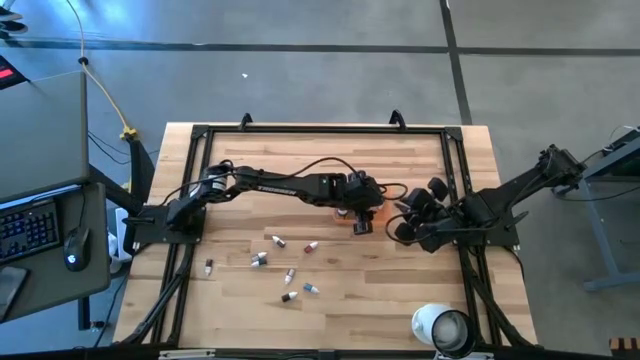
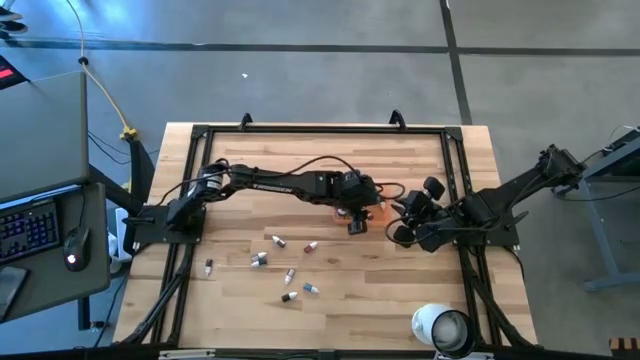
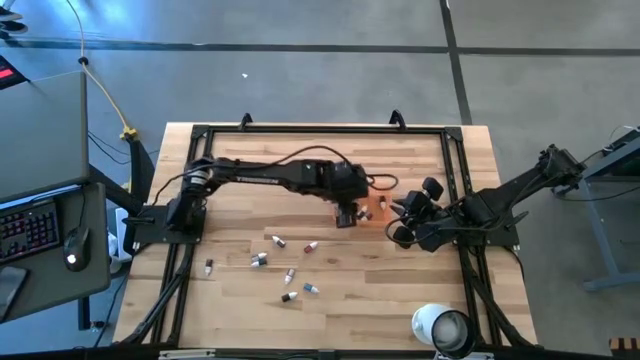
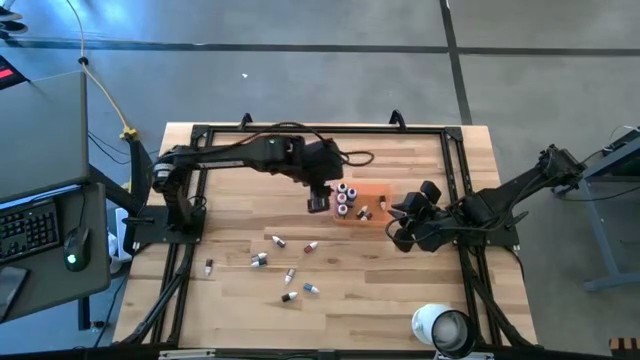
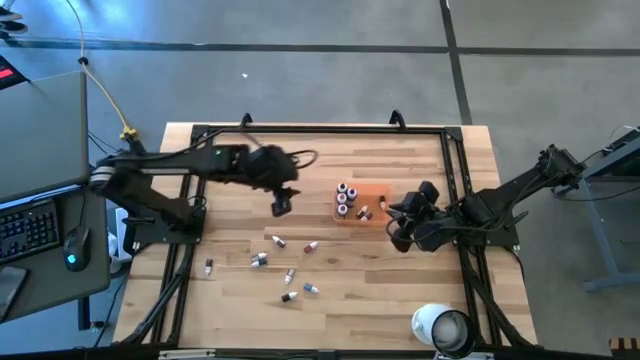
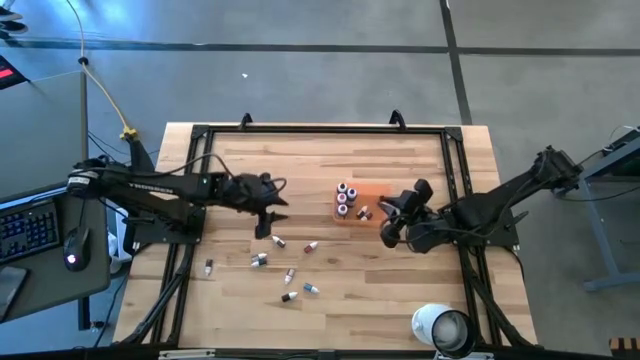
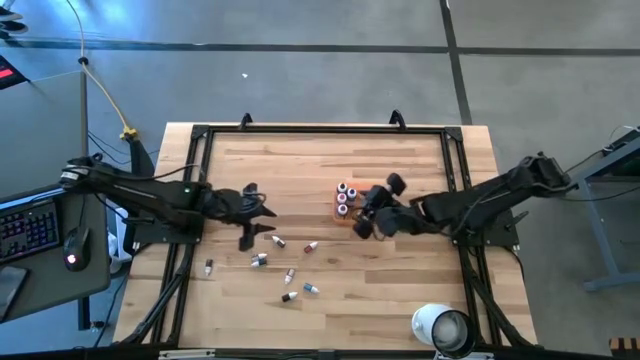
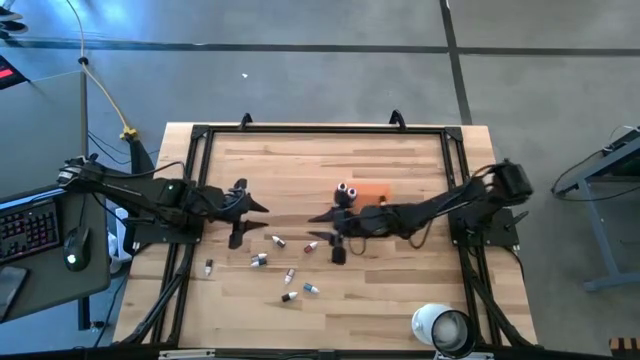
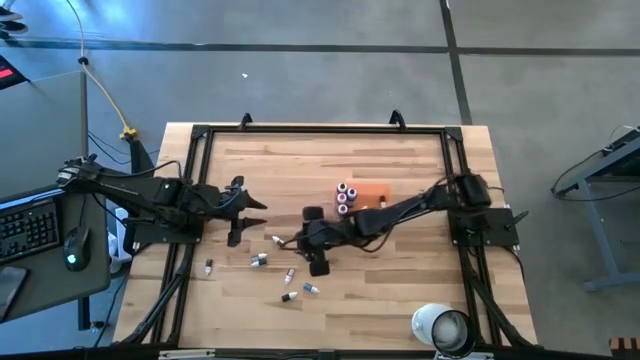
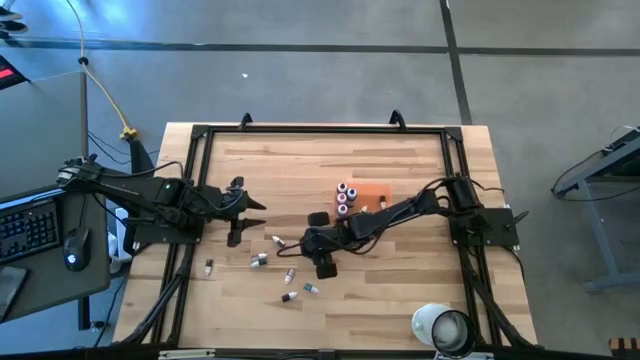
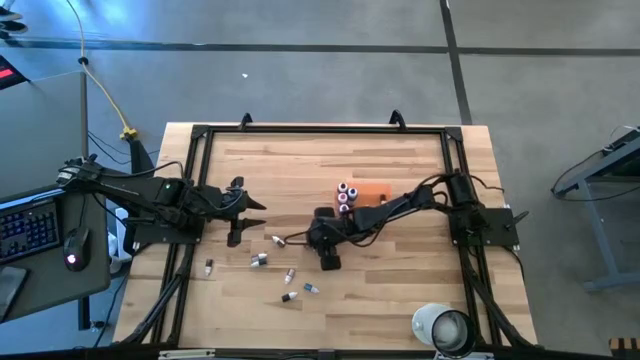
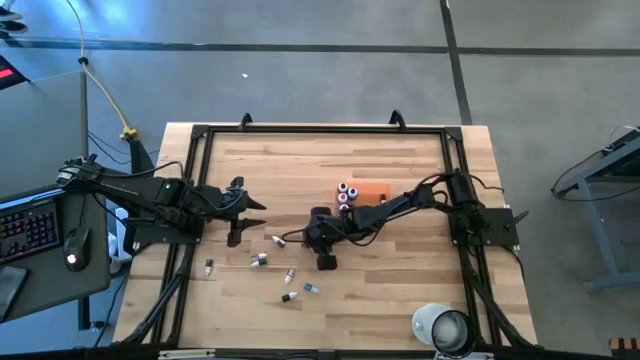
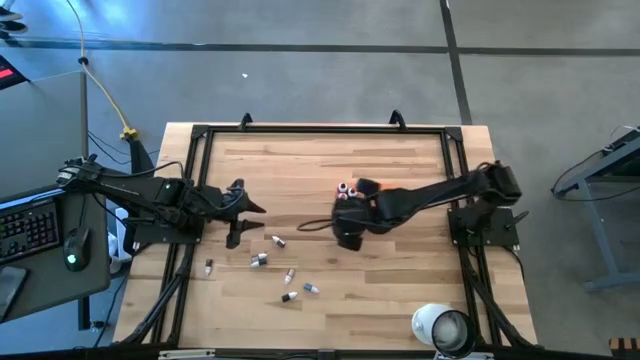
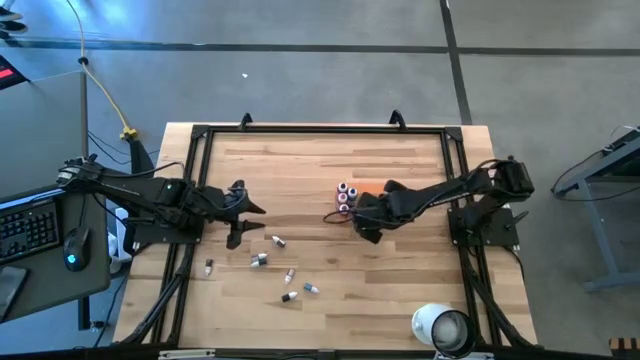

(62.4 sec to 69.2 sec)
Task: Pick & Place food coloring
Put the small red food coloring bottle into the orange bin

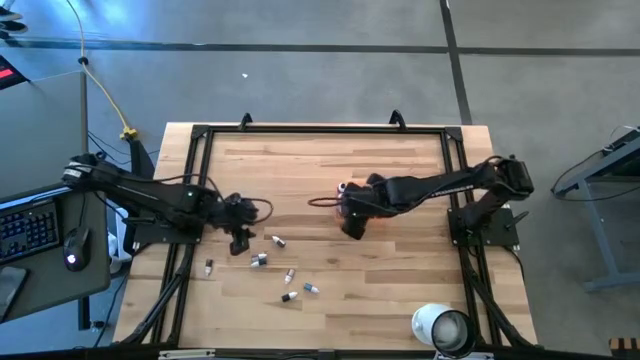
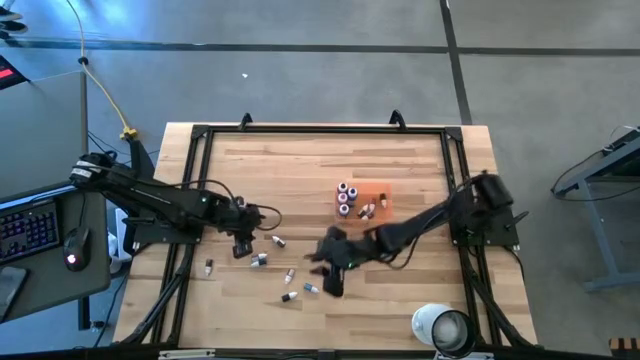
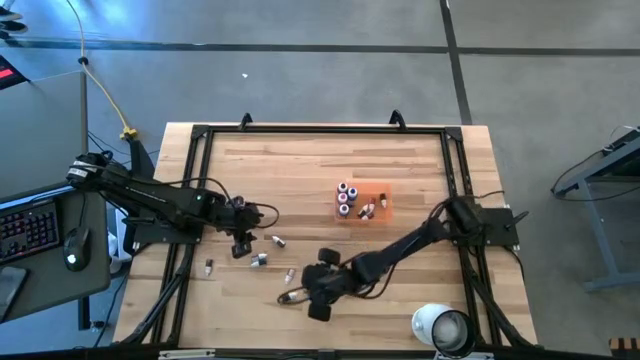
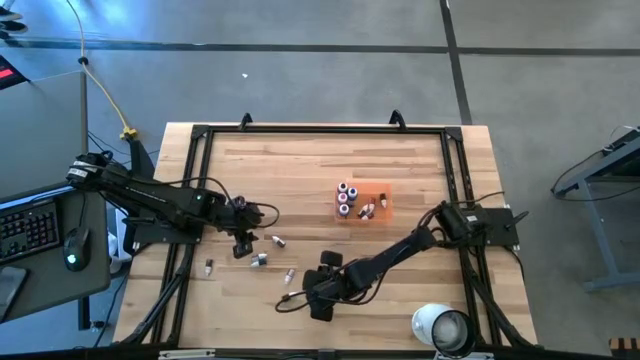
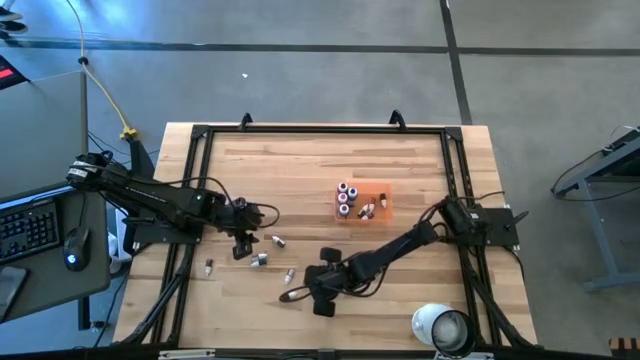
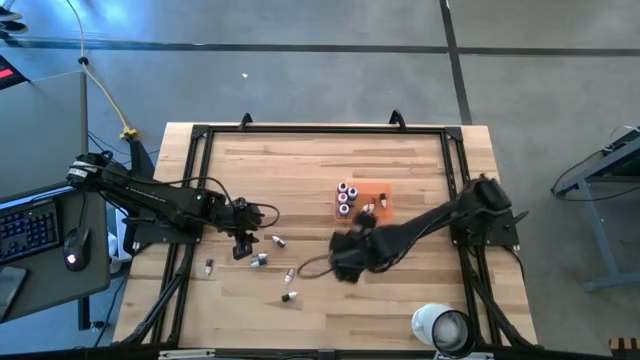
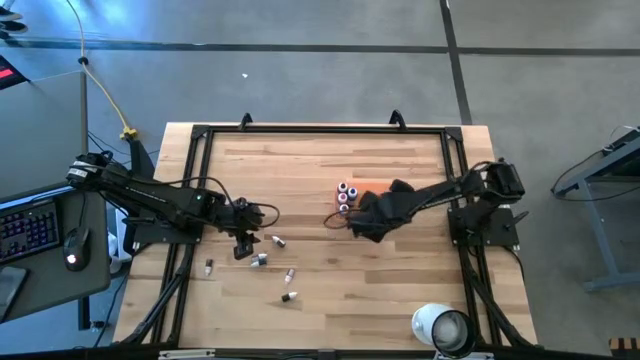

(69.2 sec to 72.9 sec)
Put the small blue food coloring bottle into the orange bin

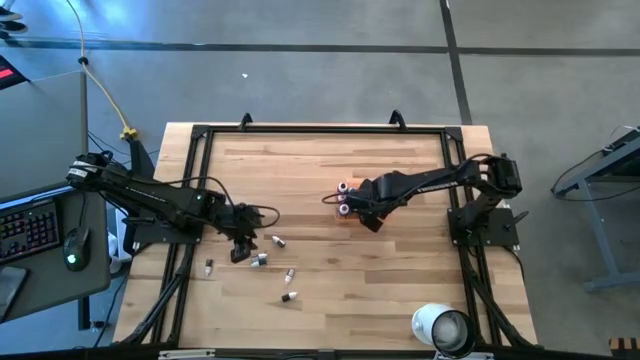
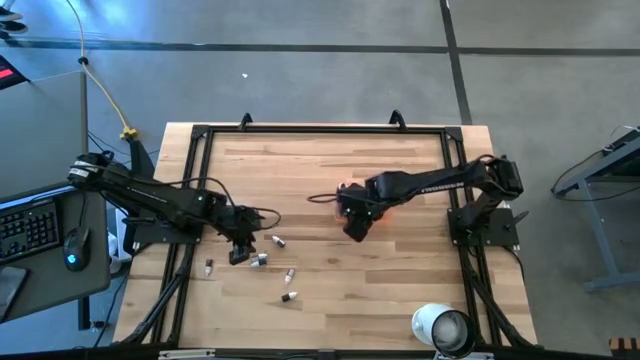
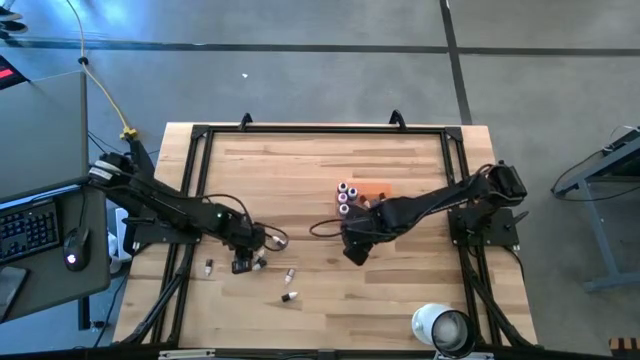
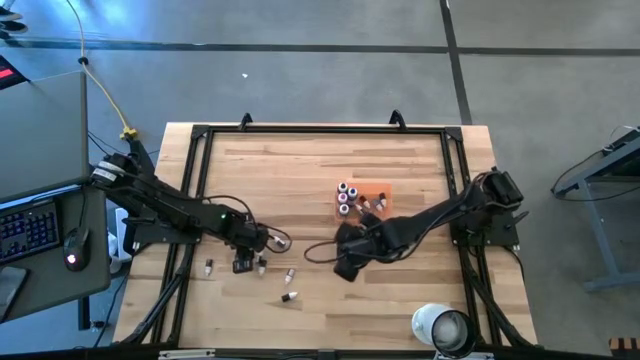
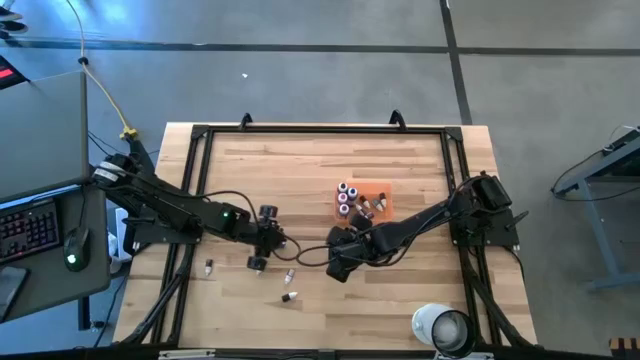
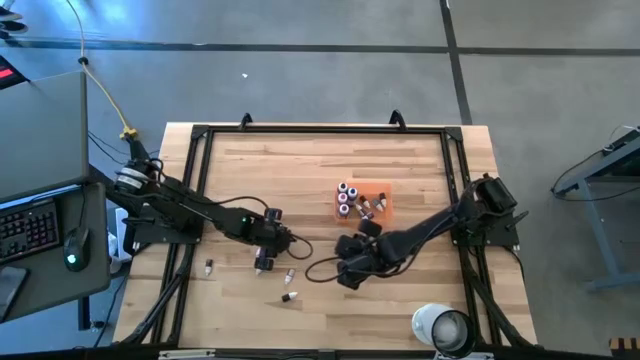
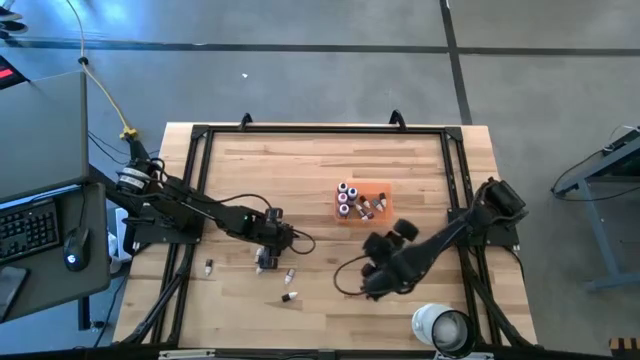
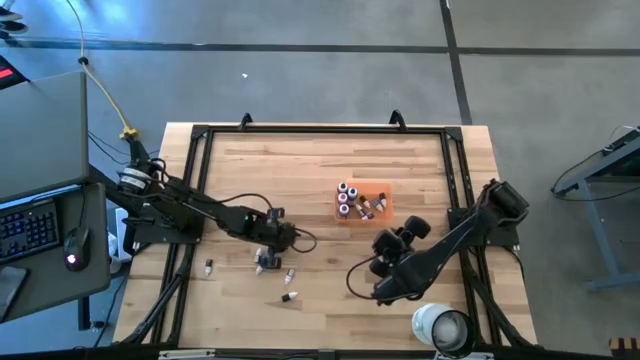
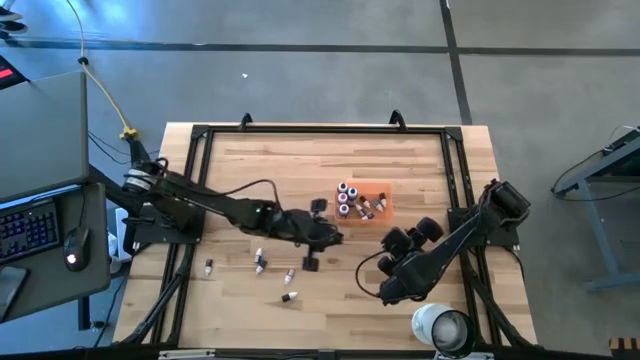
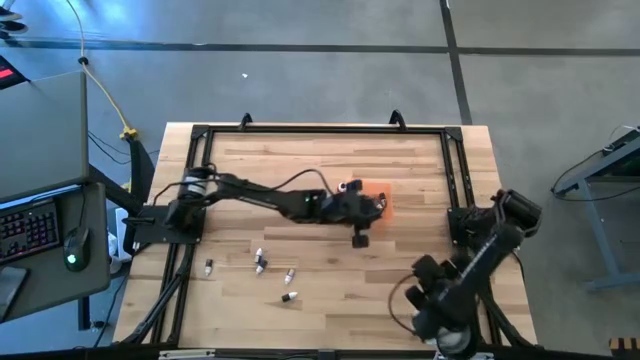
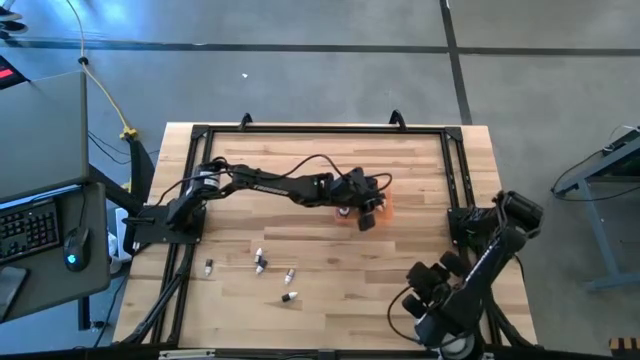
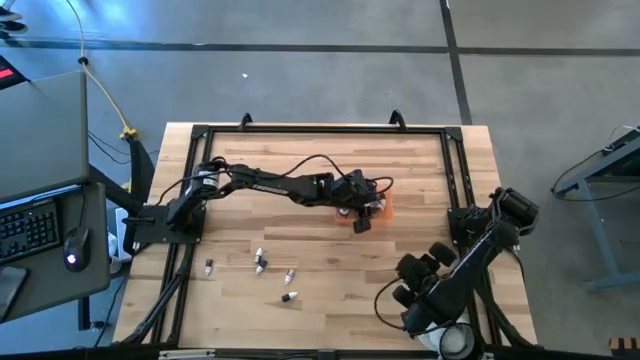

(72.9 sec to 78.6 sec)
Put the small brown food coloring bottle into the orange bin

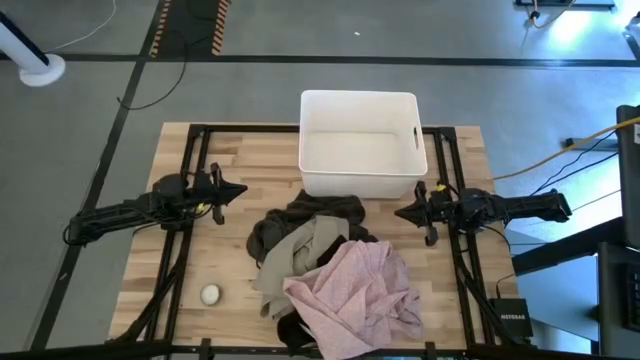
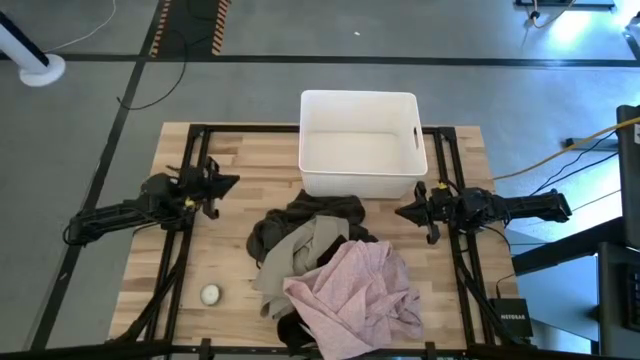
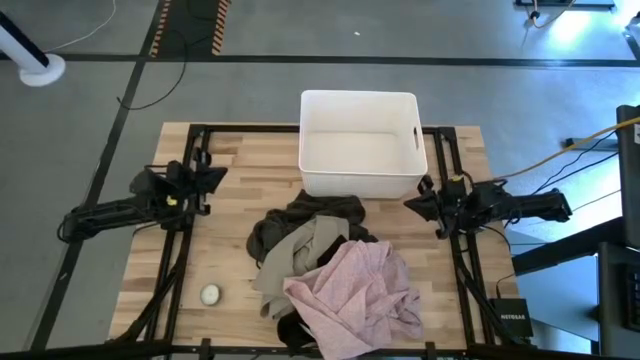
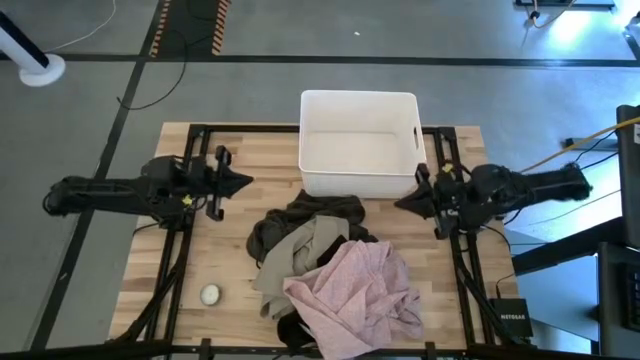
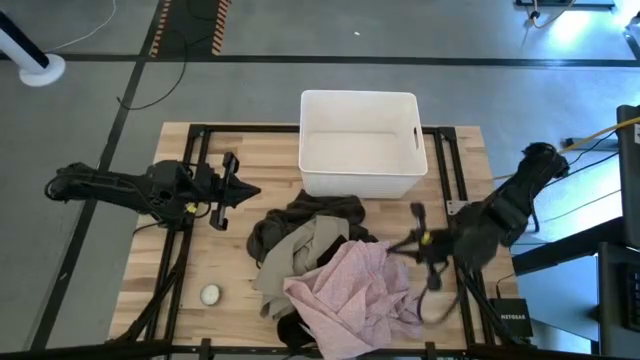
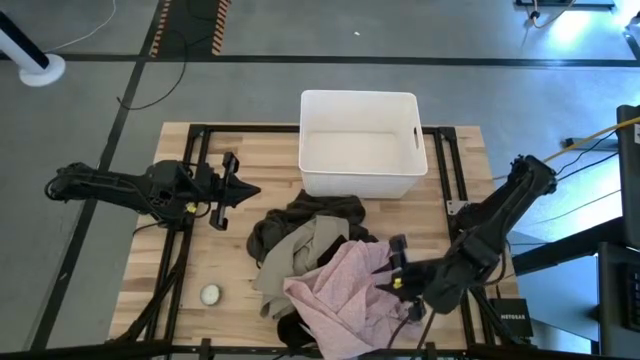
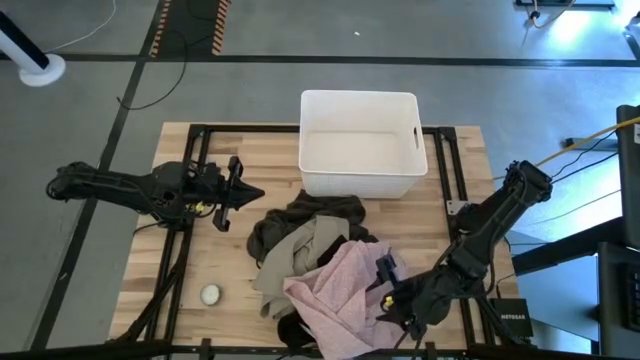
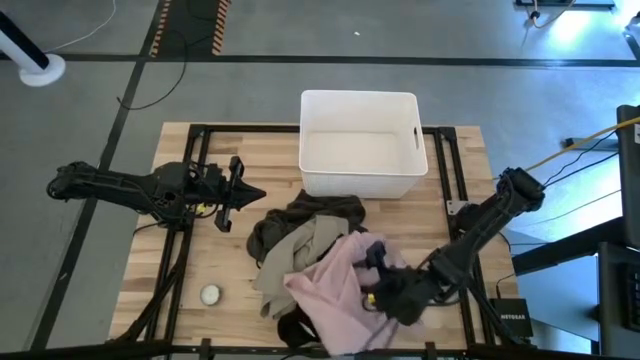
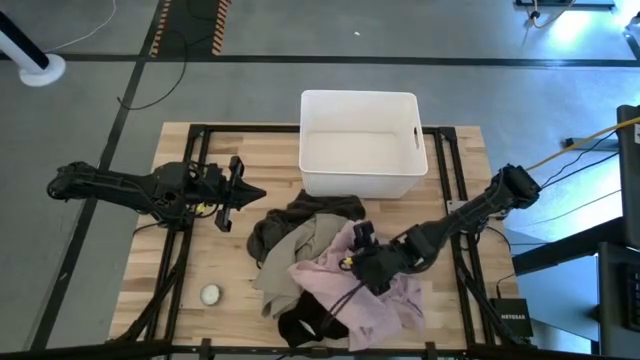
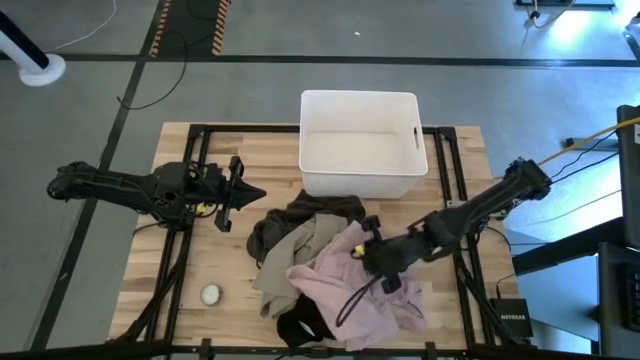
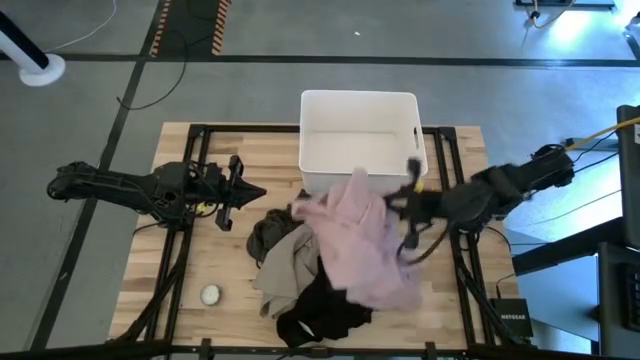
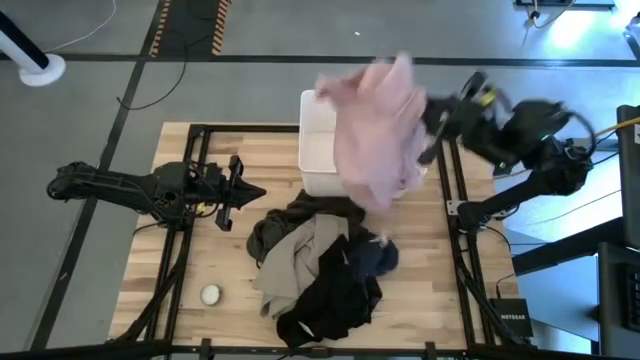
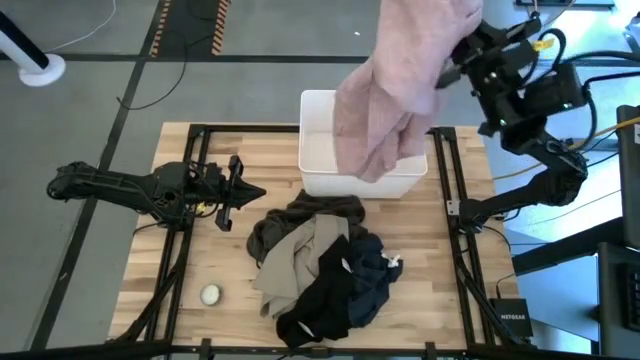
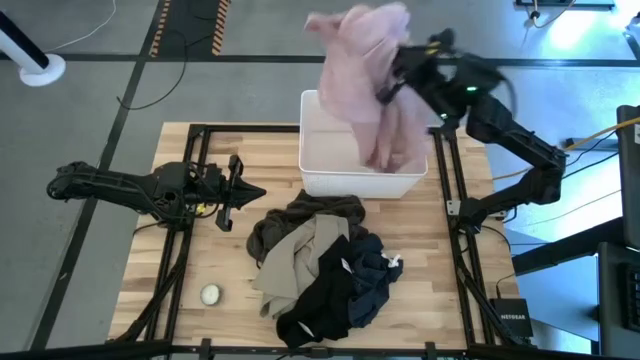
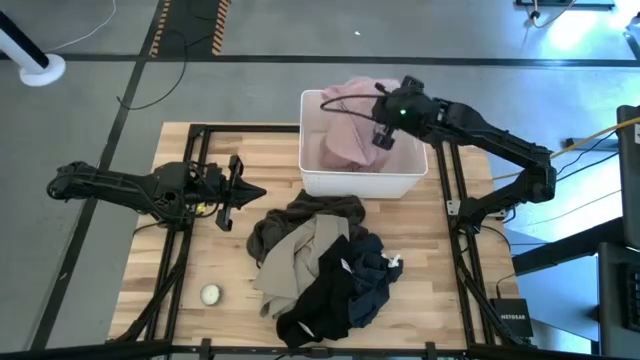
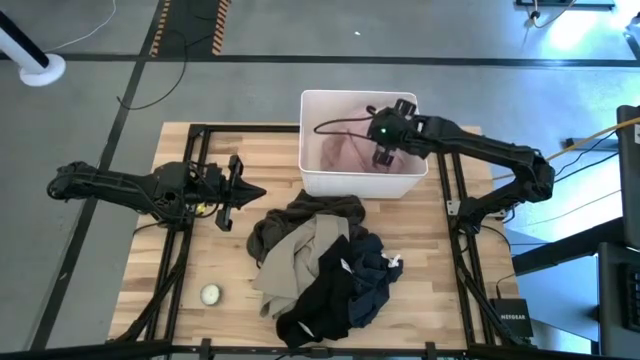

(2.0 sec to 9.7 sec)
Task: Sort clothes
Put the pink cloth into the white laundry bin
